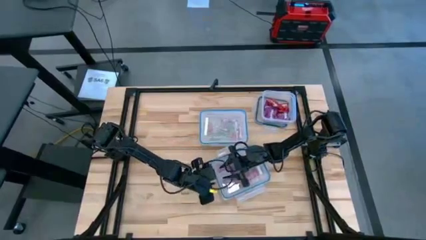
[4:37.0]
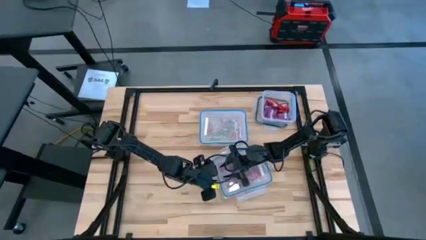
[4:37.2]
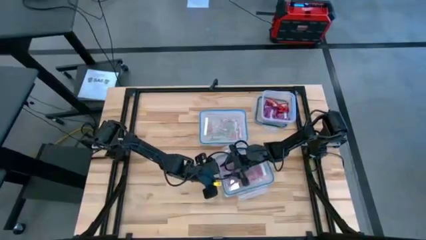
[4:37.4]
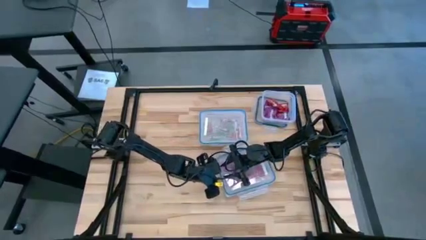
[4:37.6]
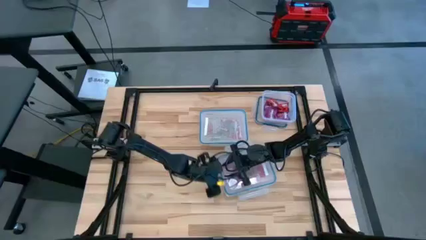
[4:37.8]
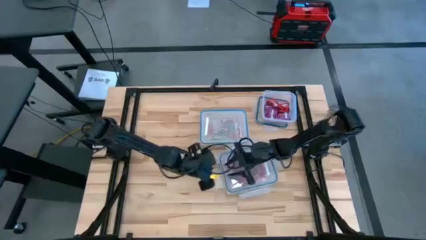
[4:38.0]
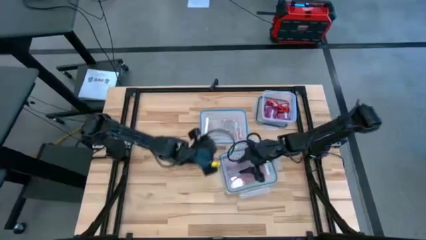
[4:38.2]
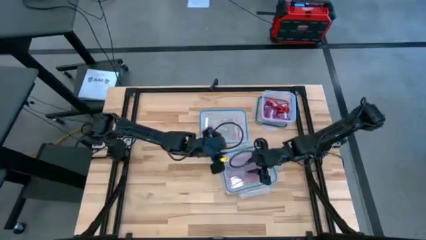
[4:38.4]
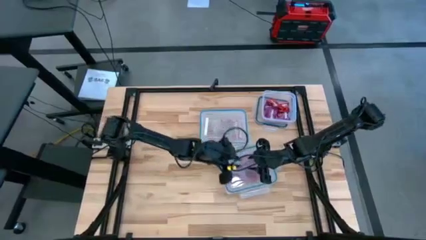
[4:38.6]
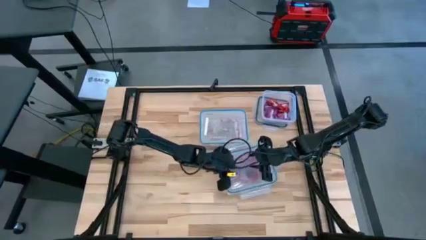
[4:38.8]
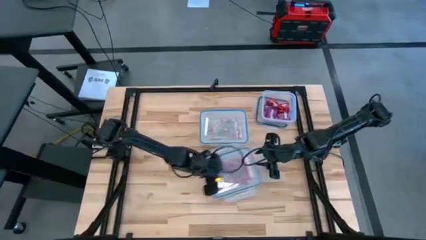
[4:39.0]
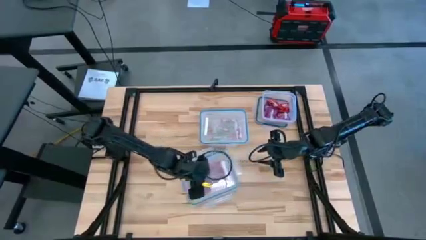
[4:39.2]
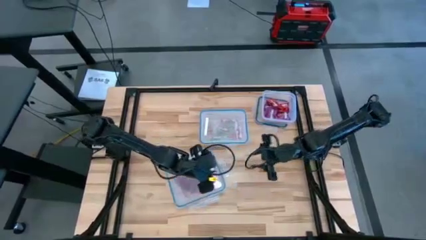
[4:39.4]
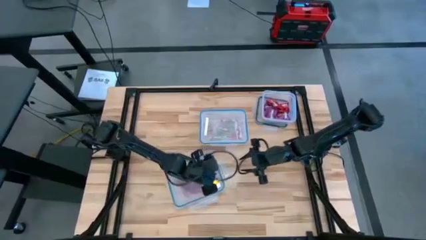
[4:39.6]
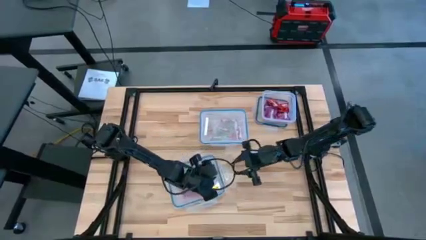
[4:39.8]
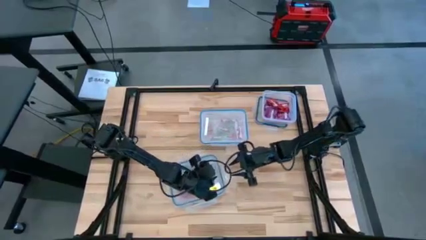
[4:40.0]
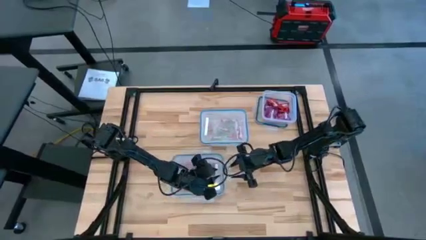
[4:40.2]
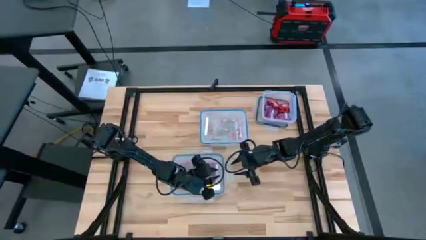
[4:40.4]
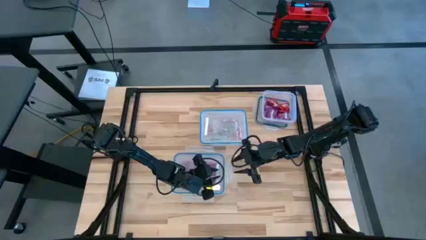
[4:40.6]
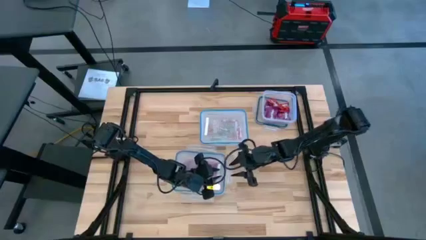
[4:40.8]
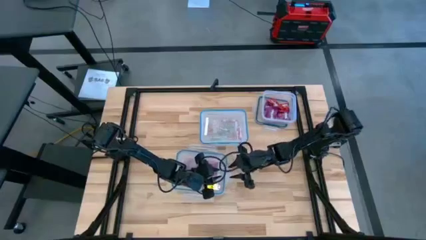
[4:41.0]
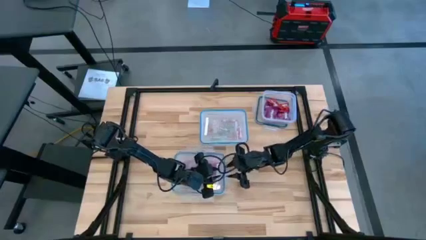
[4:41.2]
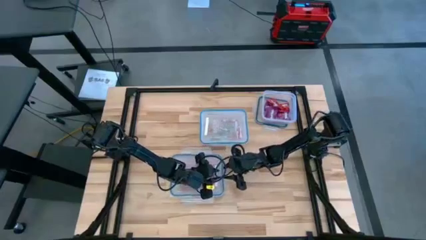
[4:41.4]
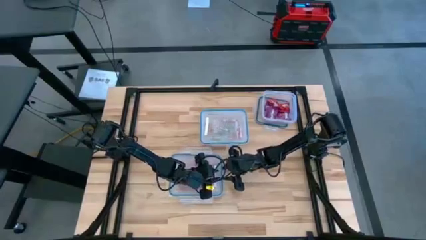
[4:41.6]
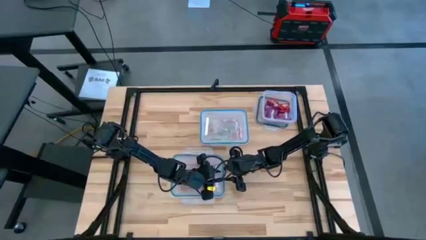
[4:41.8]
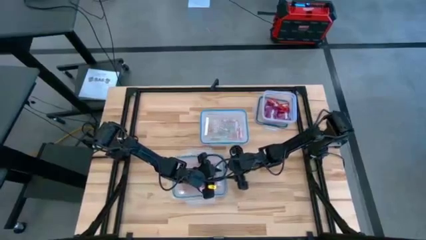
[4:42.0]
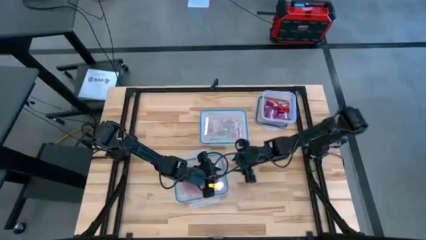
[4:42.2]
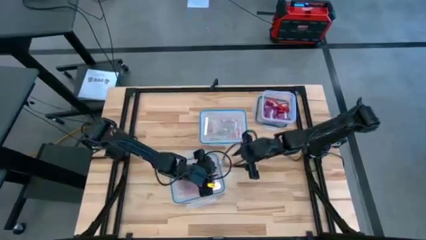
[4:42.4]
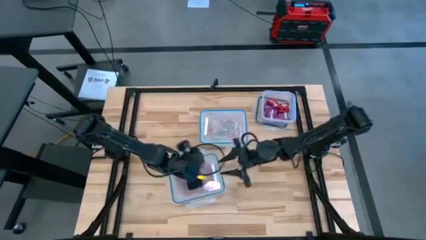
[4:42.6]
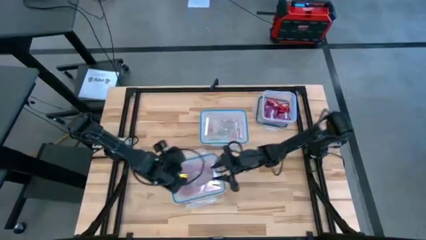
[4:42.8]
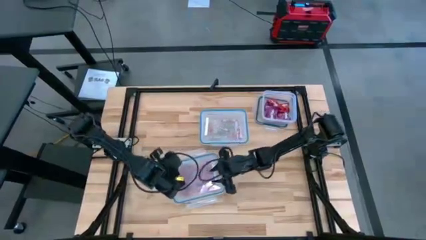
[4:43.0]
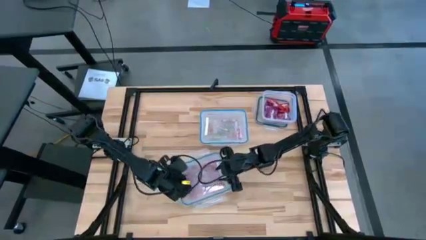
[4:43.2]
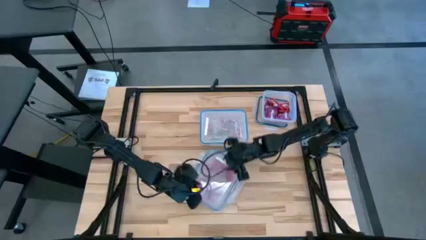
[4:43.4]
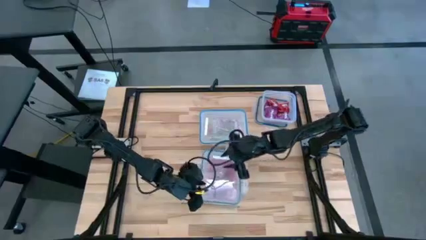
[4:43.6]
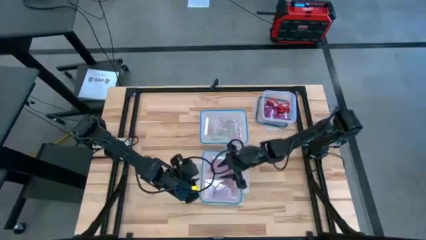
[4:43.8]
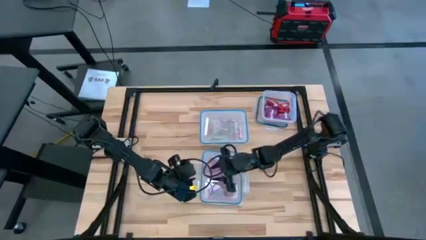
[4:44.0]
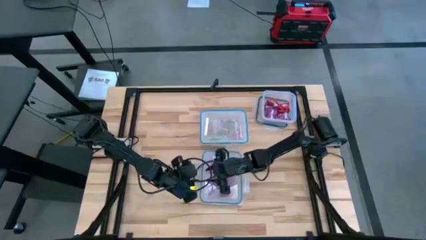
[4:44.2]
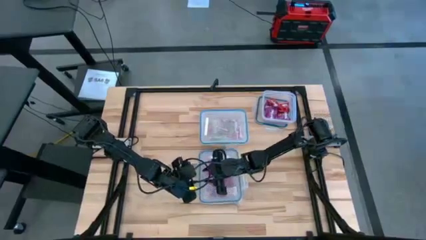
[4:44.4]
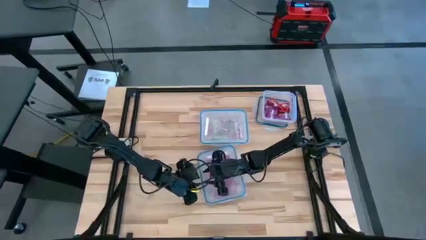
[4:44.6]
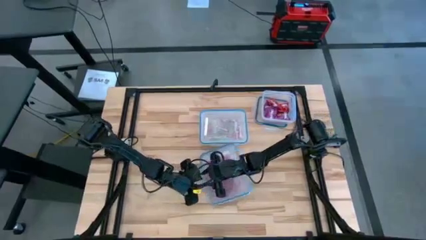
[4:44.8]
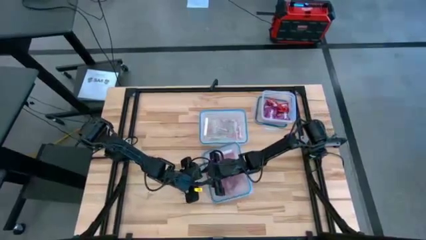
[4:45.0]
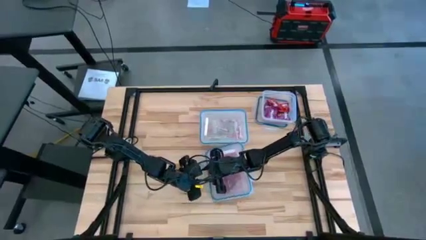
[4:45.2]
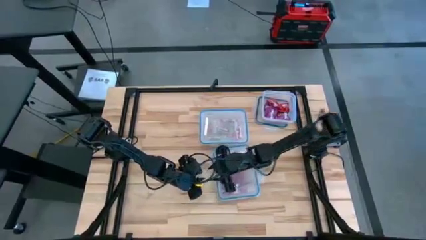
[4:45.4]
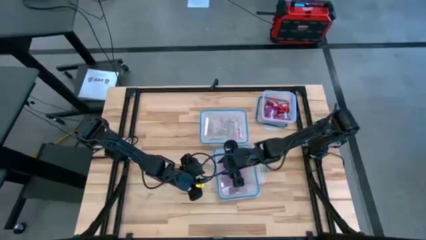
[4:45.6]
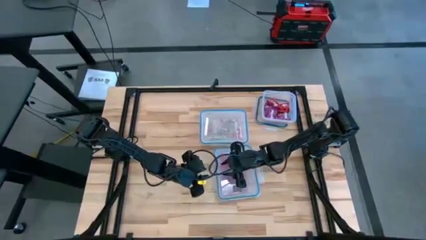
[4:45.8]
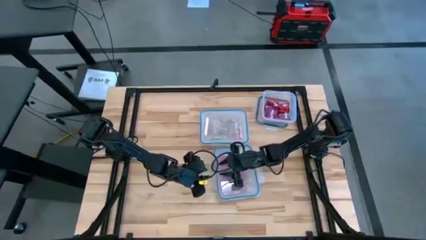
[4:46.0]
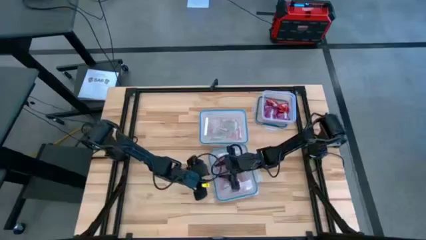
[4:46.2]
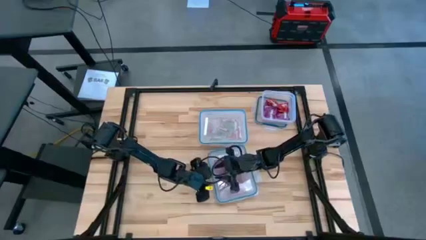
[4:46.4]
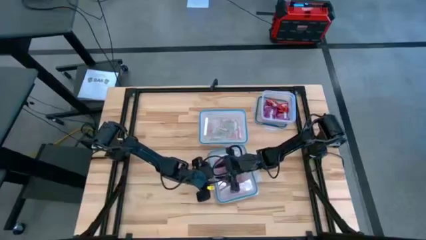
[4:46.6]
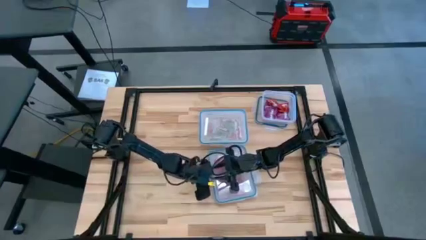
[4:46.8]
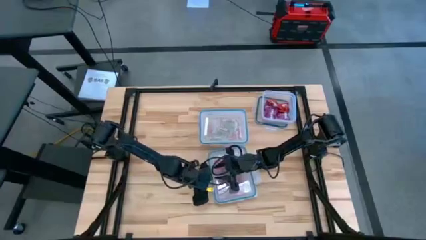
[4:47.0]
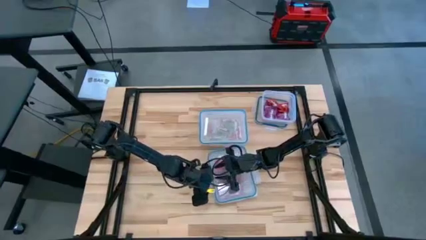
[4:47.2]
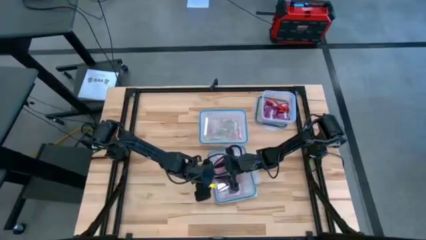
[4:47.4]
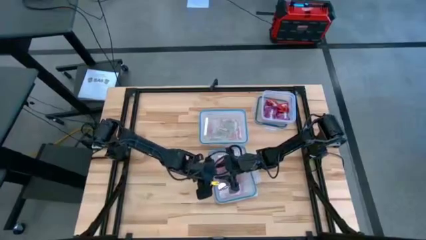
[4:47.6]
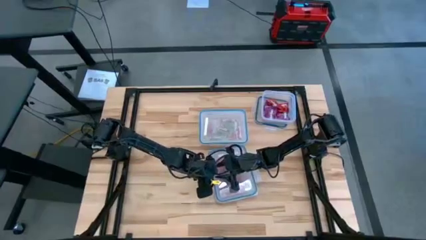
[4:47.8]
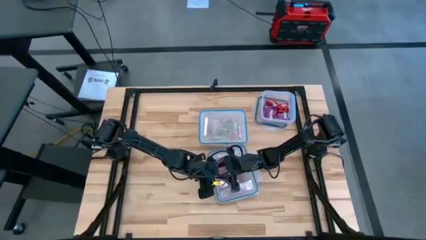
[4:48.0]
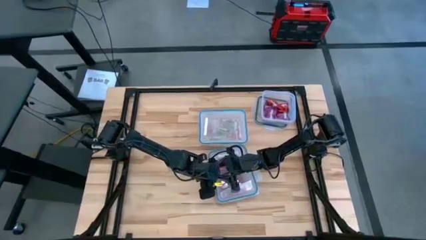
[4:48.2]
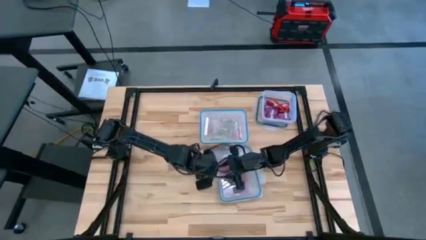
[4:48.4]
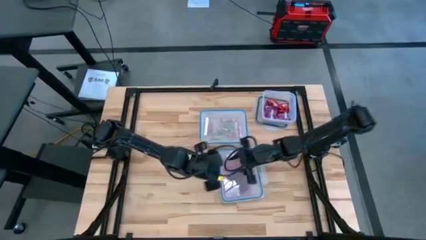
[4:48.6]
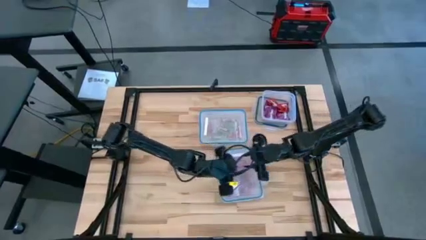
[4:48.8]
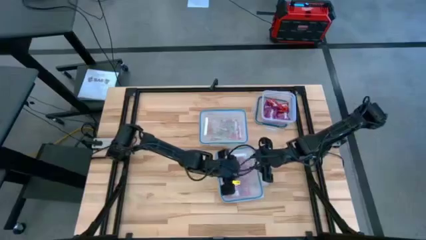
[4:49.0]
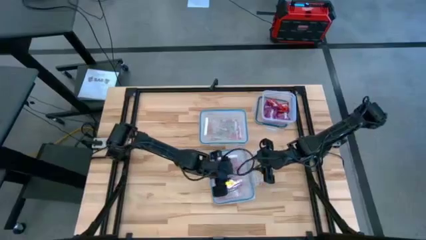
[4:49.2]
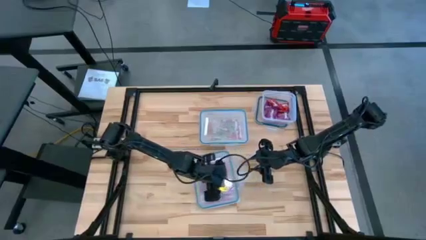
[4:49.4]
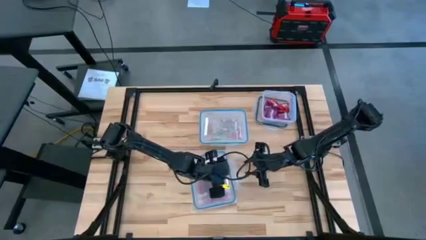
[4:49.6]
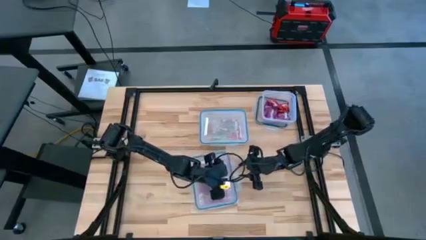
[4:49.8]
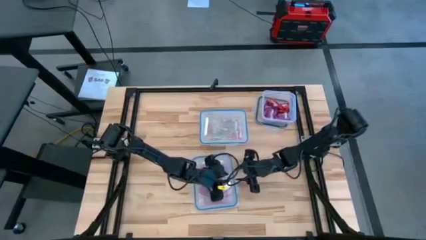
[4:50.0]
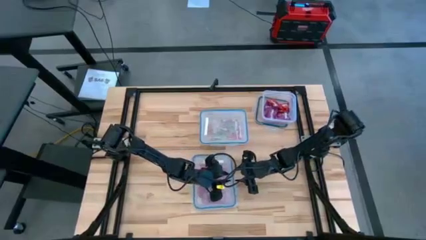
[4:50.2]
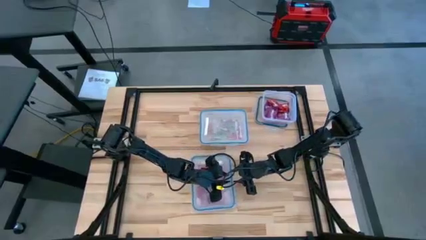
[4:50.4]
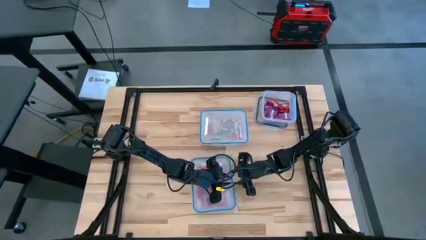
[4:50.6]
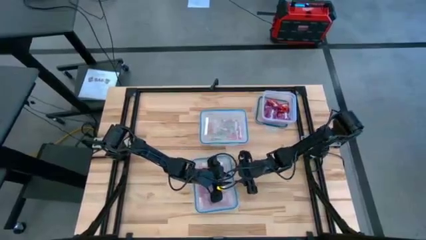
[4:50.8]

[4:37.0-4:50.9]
Task: Sort candy
Close the top left transparent bin

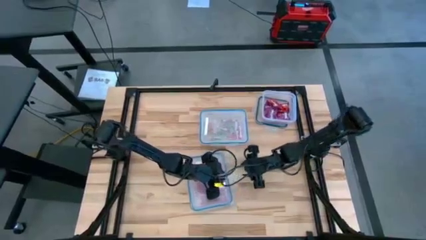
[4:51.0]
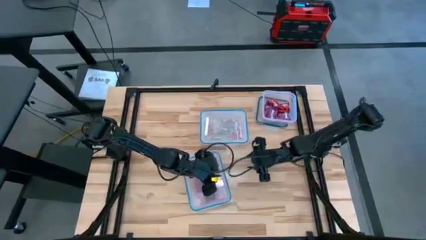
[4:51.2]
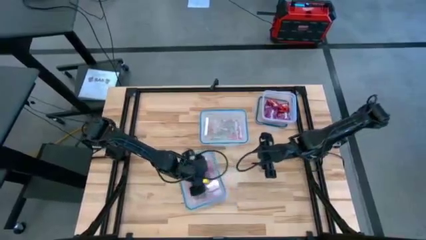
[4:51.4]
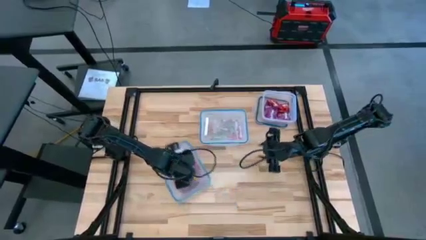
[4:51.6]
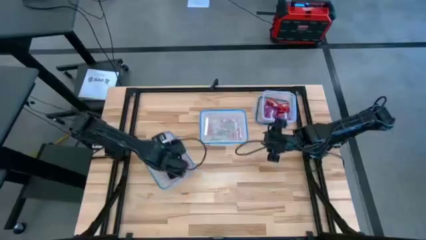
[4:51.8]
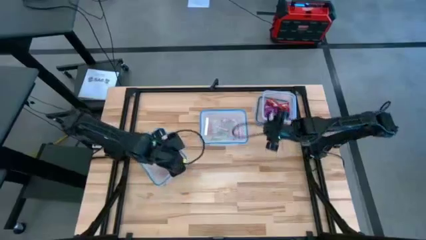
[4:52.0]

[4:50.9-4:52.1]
Move the top left transparent bin to the middle left

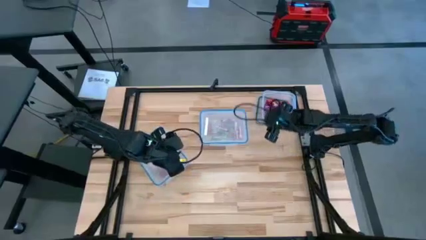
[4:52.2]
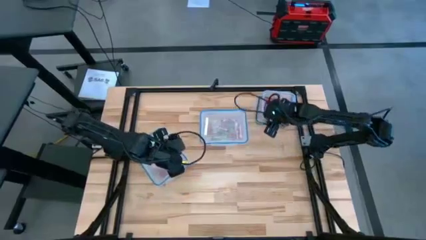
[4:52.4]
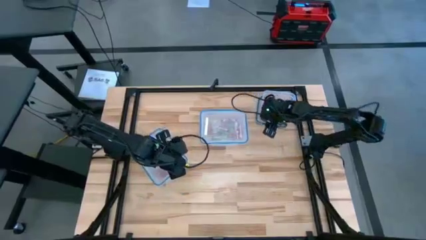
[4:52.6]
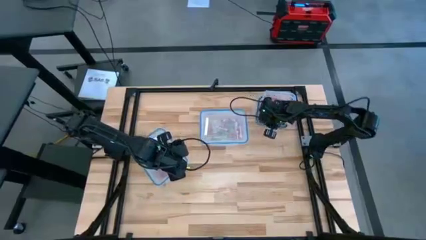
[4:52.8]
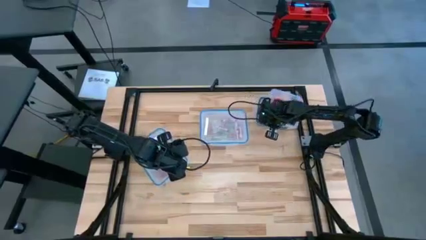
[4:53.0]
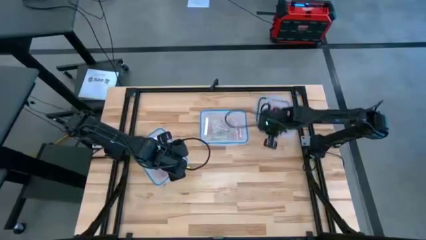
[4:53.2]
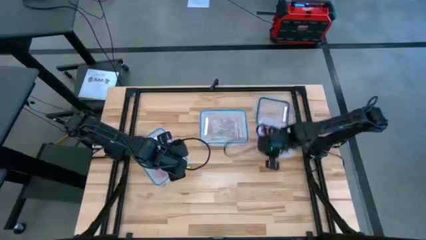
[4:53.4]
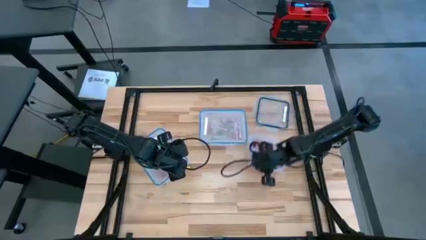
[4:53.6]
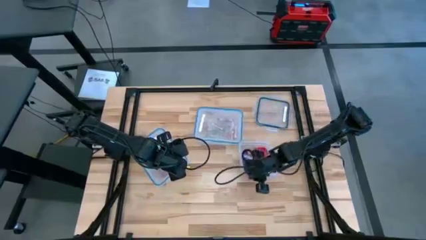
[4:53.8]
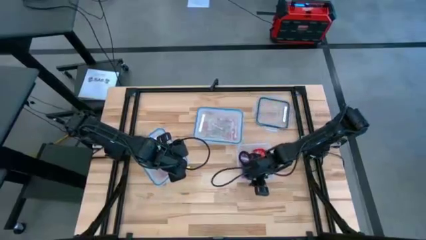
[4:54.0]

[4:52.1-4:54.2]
Move the top right transparent bin to the middle right
